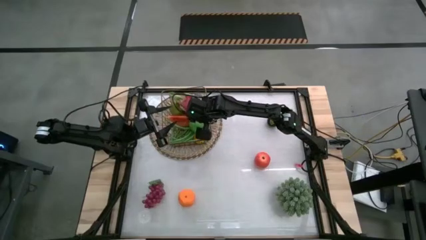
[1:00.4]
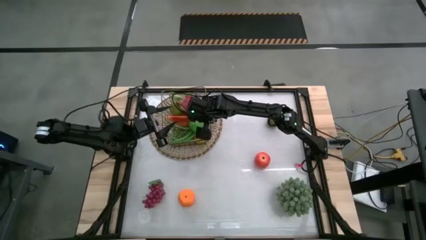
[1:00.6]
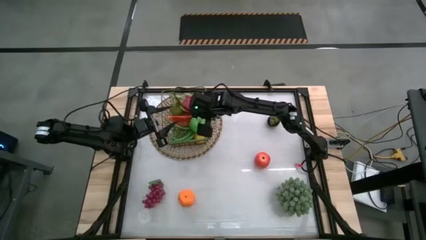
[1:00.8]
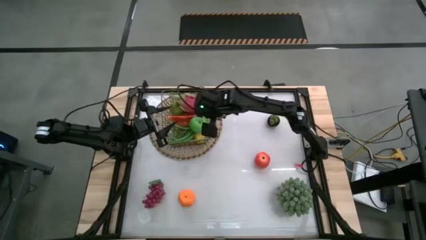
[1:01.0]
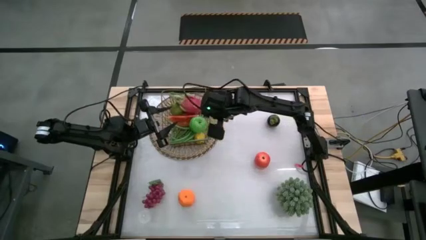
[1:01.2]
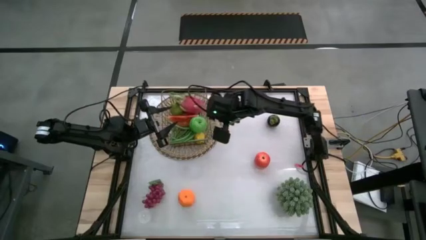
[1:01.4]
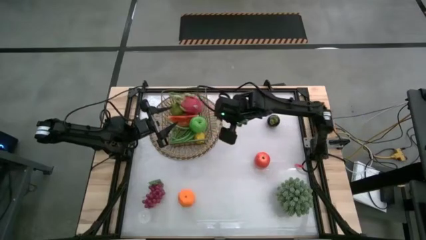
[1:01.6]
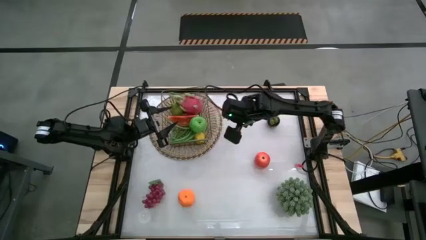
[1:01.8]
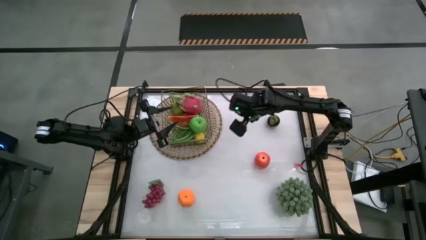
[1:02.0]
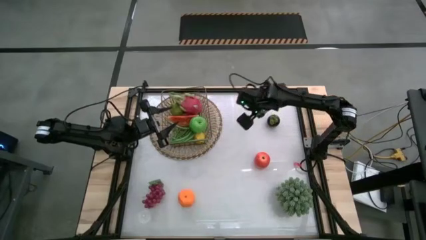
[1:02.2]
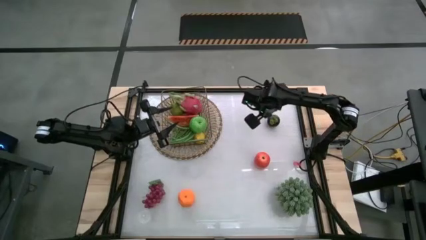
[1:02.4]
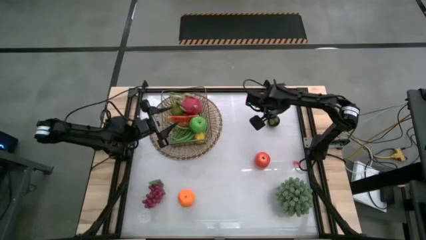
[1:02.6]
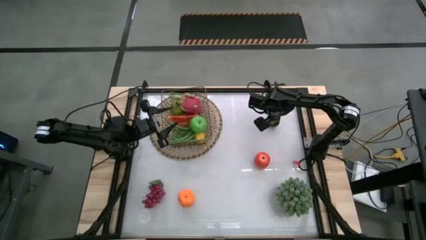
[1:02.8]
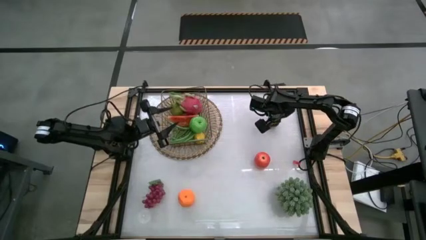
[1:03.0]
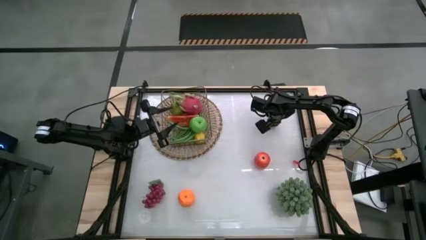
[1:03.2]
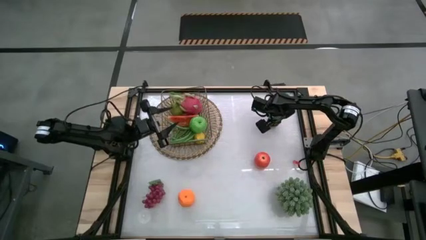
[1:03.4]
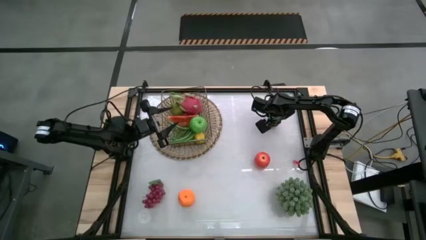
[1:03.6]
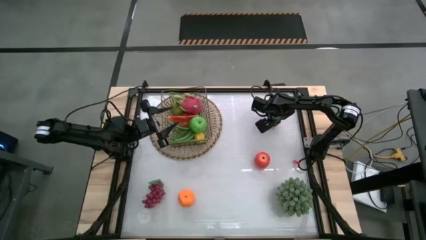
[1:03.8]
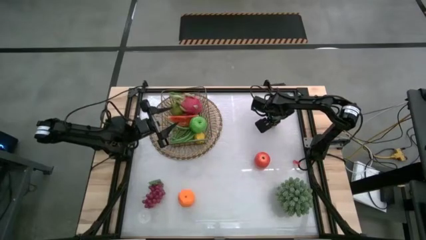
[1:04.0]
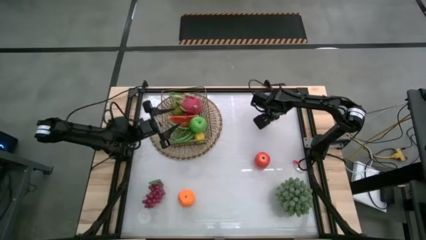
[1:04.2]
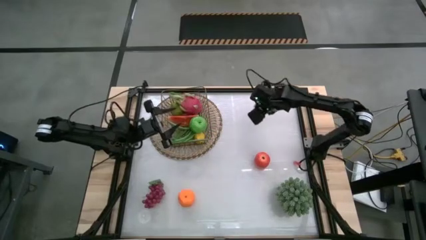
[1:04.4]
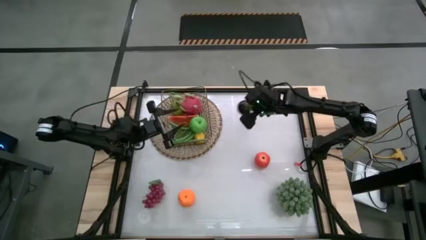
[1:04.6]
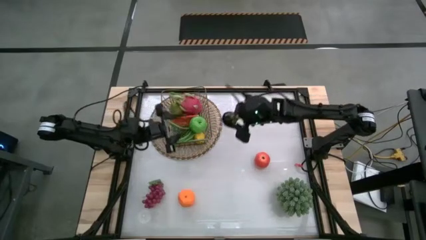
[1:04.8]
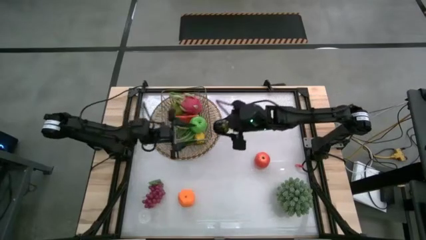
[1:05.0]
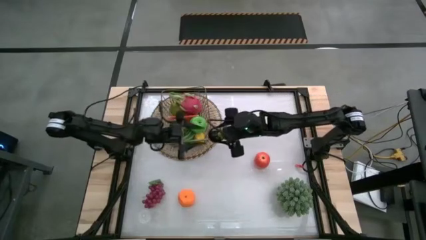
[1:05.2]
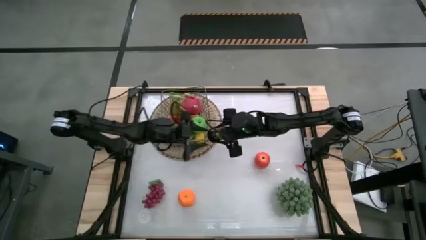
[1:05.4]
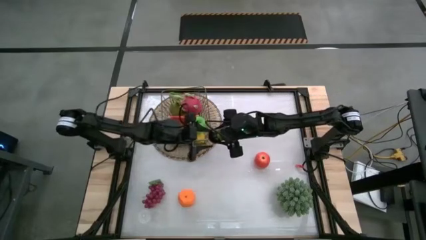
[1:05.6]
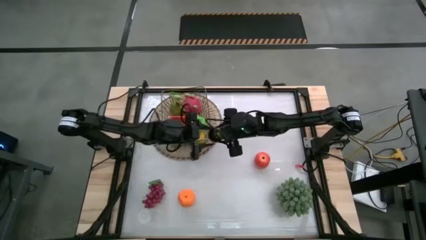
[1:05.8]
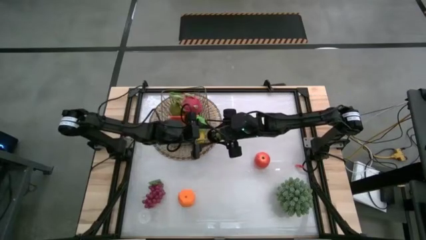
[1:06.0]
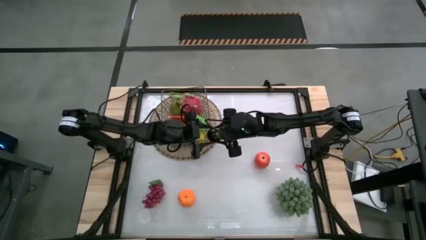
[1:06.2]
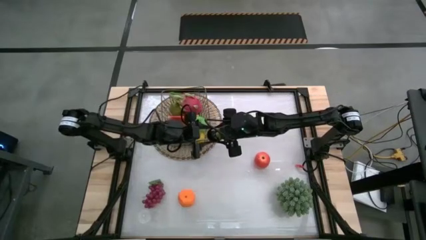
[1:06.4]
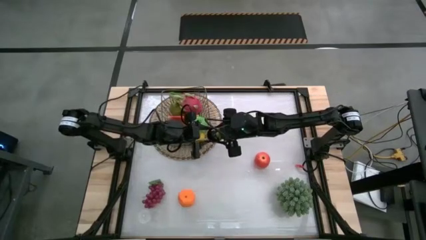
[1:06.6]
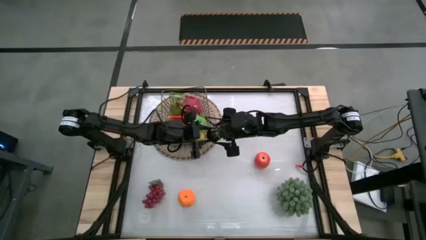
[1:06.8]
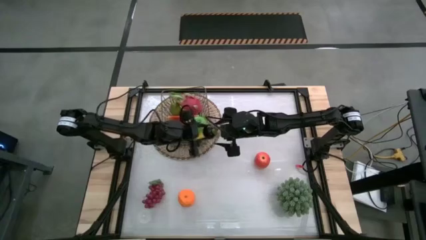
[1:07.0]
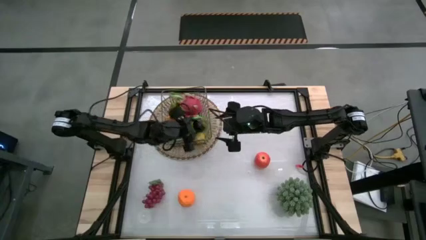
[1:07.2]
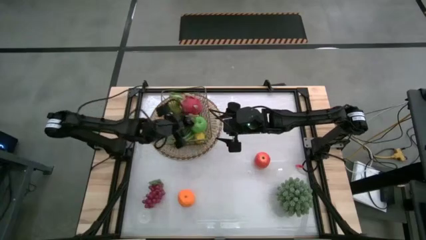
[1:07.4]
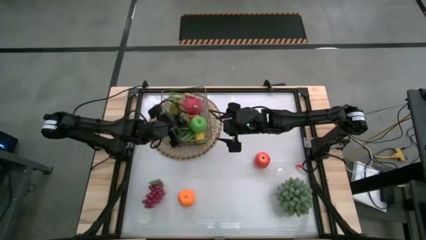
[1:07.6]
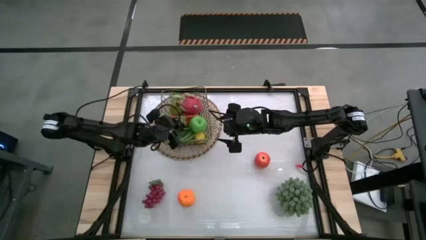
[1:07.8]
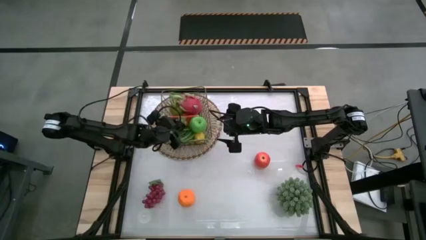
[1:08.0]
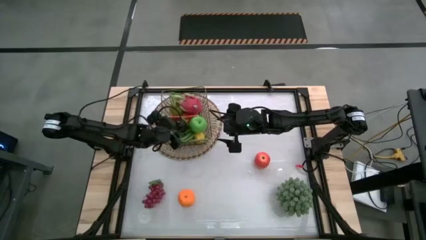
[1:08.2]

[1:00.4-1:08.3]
Task: Build produce basket
Put the purple mangosteen into the wire basket

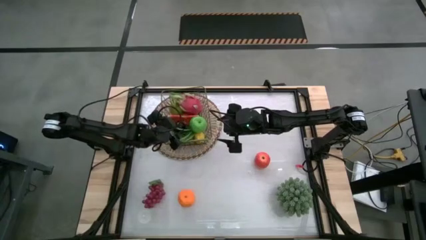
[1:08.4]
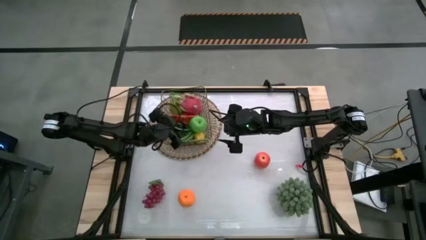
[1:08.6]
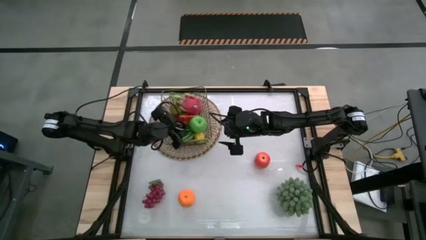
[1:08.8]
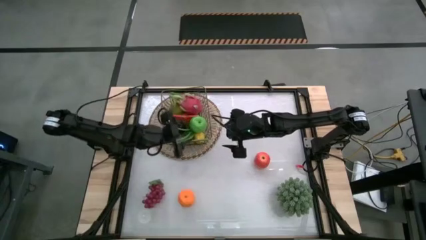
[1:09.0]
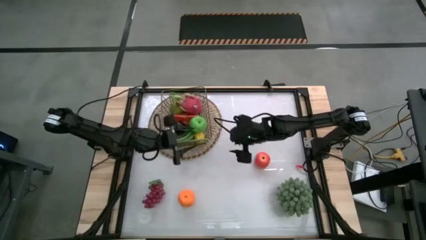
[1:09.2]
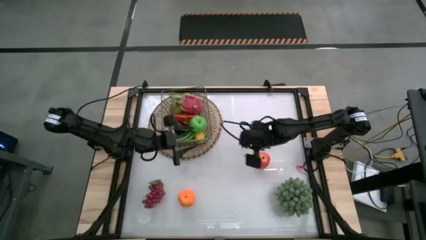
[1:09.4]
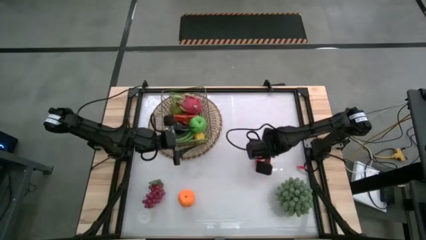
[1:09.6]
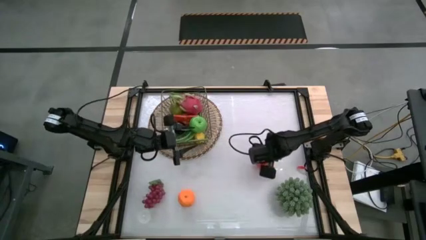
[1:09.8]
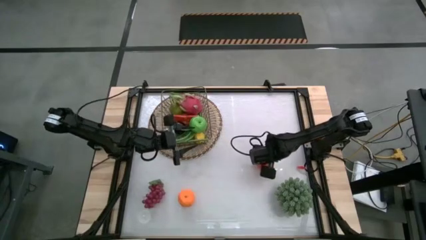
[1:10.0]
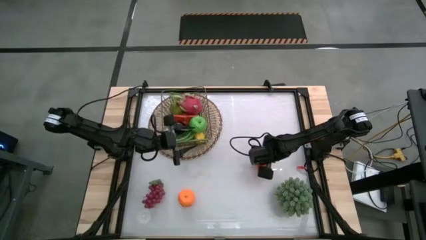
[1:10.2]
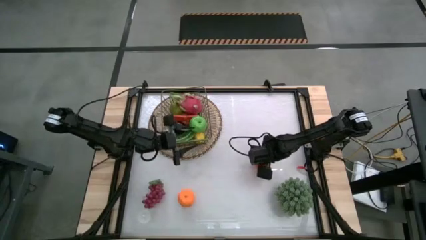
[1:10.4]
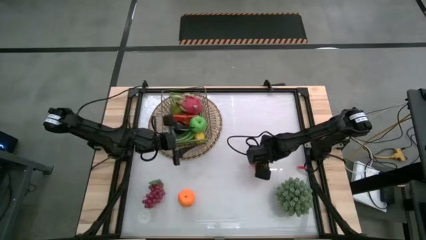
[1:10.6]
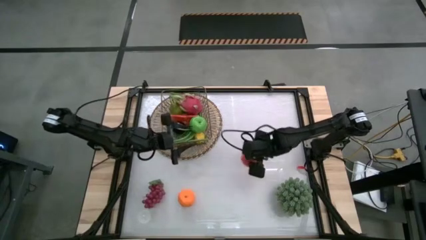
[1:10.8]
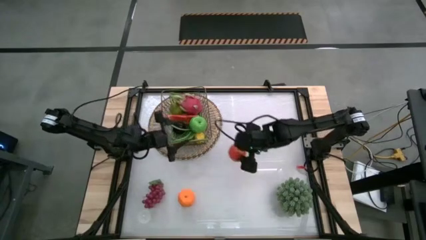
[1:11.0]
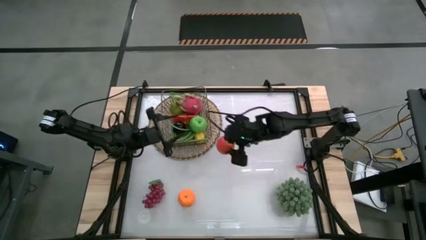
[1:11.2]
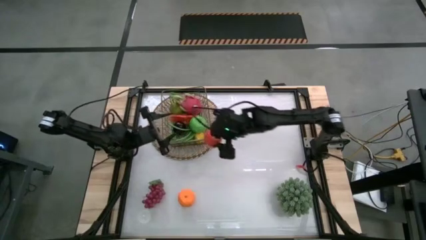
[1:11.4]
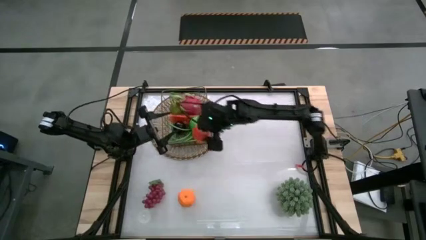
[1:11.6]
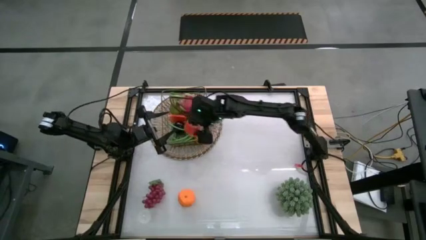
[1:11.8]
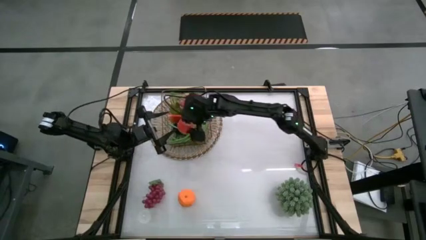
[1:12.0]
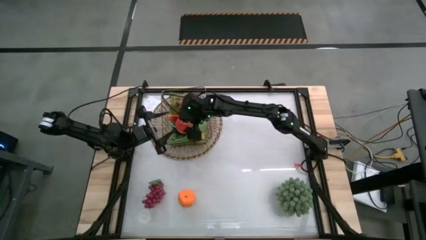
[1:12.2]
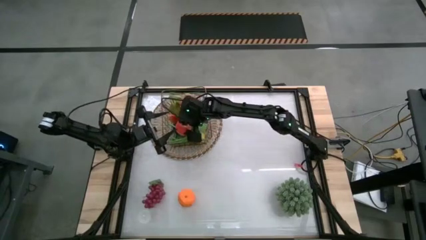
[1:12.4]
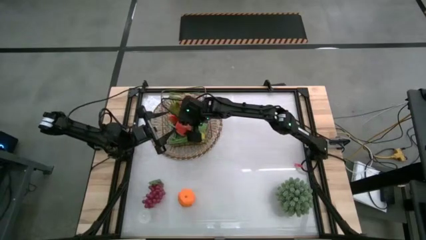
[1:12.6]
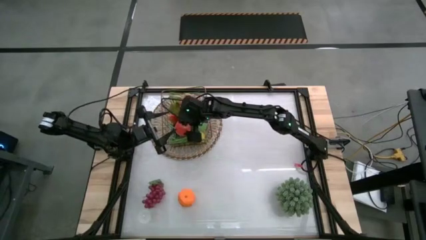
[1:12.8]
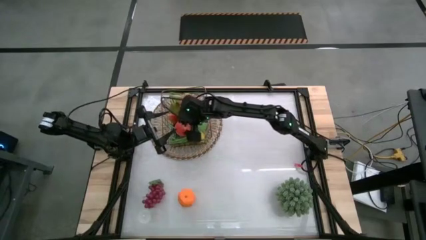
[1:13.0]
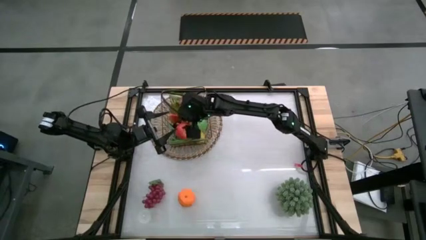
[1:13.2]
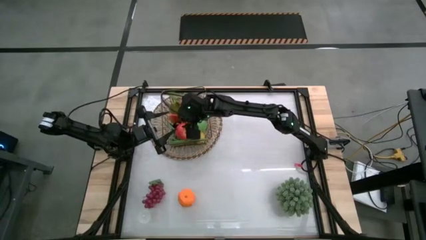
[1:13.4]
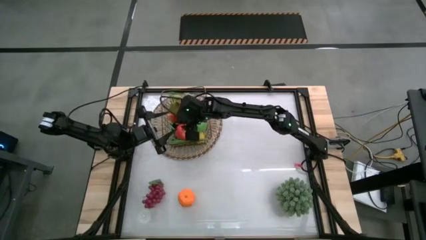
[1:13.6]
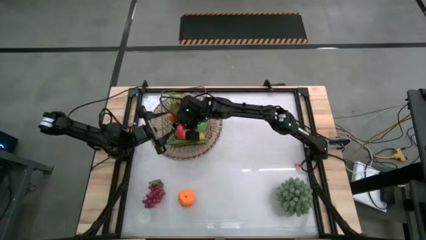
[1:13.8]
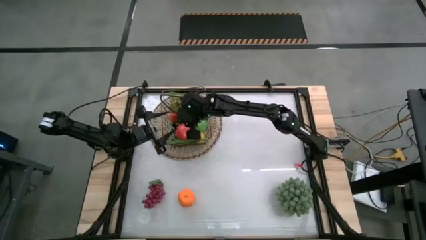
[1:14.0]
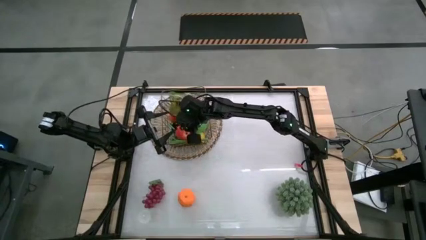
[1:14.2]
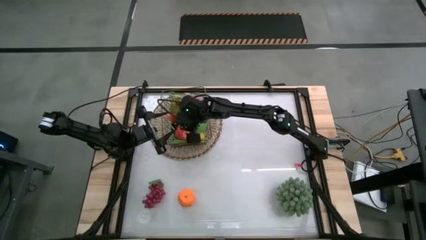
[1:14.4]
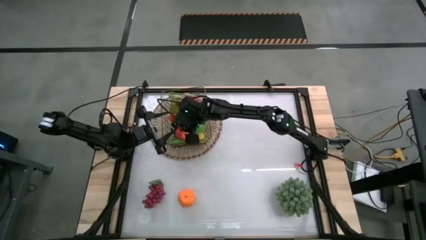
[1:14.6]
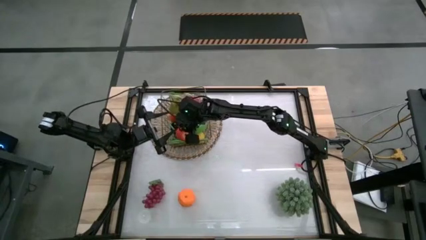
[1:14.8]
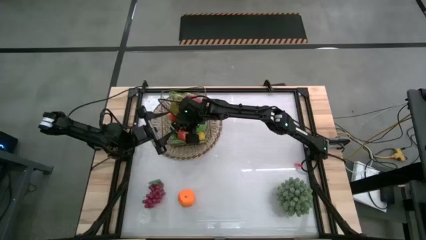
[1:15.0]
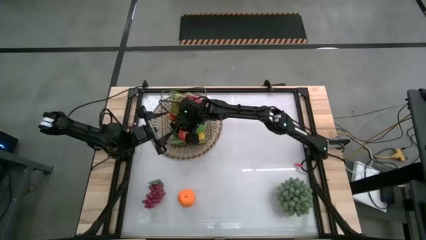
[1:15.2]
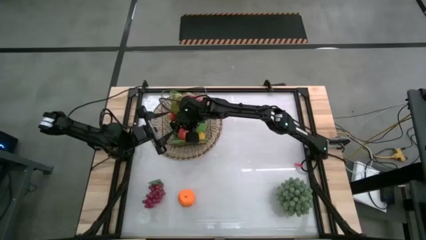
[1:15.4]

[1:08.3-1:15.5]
Put the red apple into the wire basket

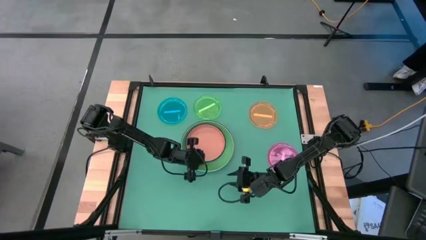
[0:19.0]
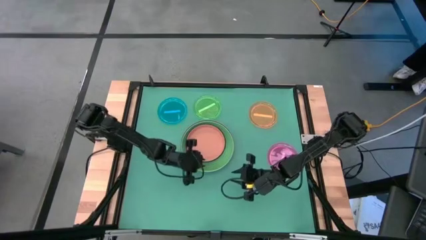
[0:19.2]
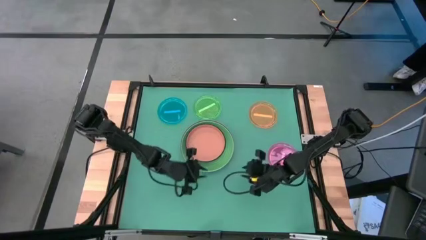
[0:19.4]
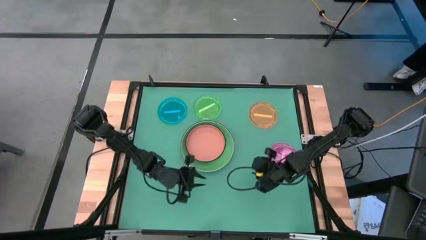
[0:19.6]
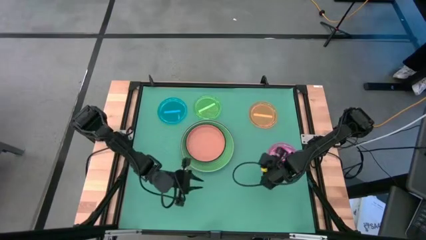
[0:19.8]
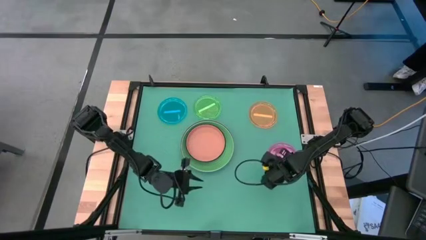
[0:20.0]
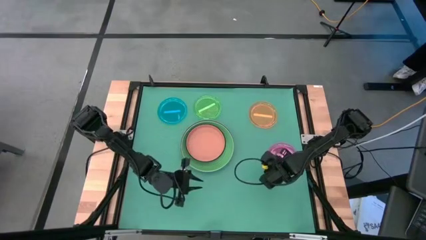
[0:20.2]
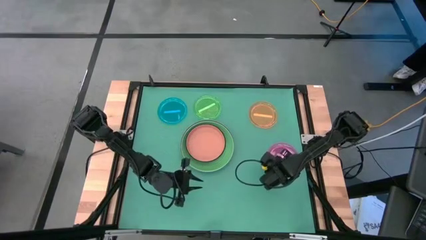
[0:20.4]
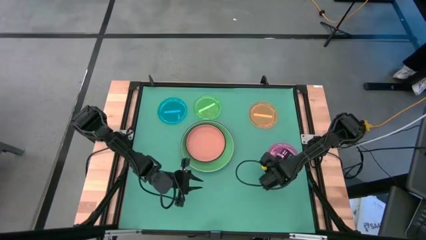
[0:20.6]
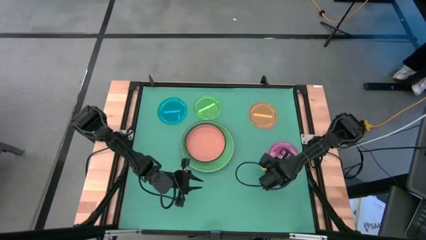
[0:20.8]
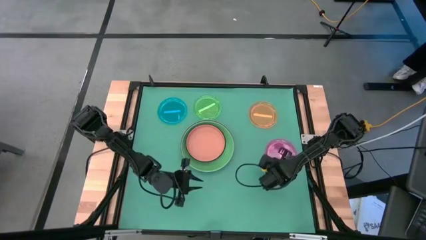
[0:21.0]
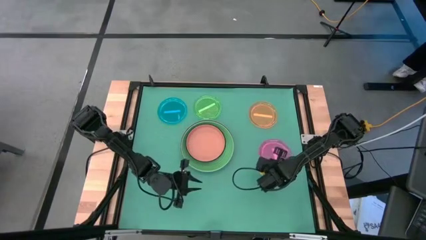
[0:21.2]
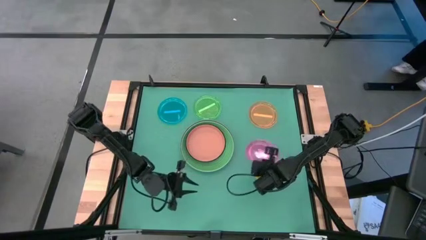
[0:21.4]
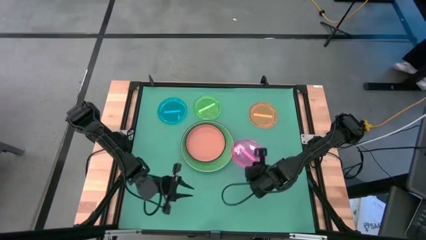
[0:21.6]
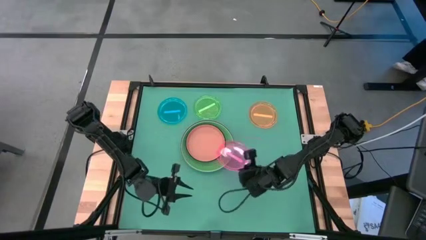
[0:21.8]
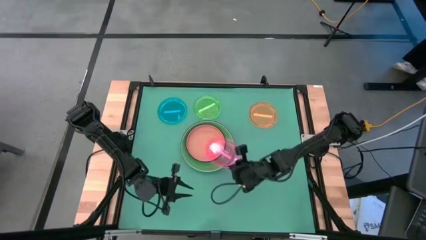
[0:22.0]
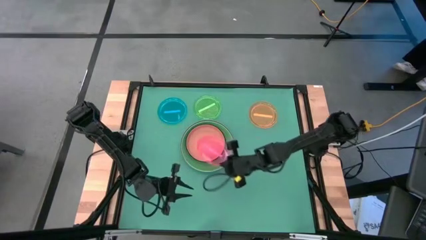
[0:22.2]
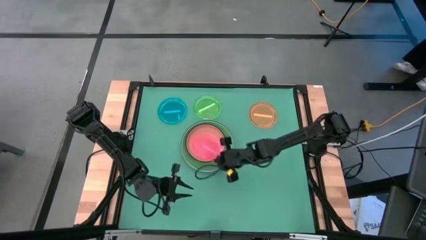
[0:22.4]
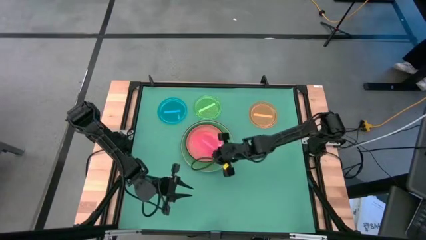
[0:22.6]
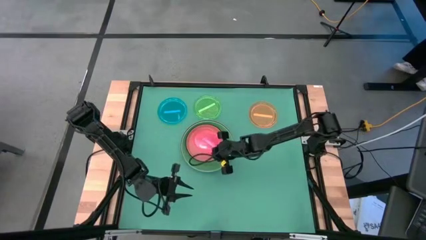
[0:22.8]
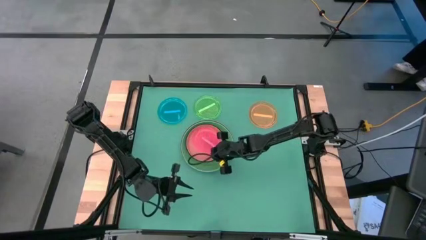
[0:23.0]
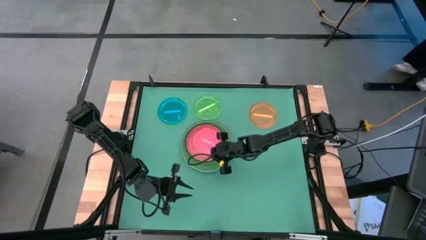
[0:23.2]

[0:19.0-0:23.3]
Task: Stack plastic plates
Stack the transparent pink plate on top of the orange plate
